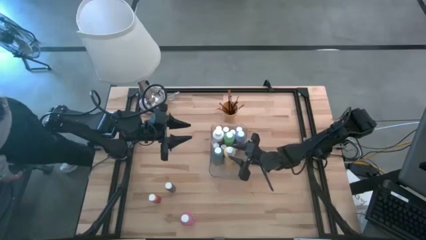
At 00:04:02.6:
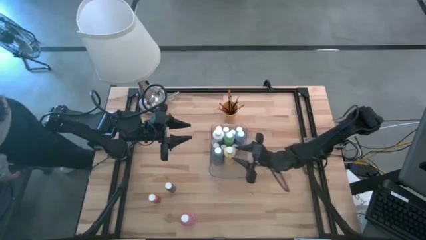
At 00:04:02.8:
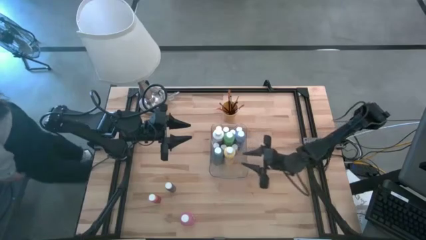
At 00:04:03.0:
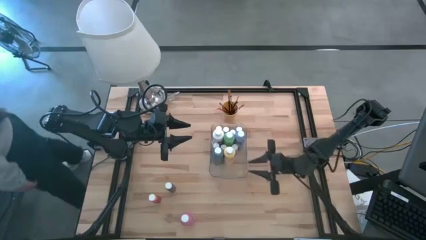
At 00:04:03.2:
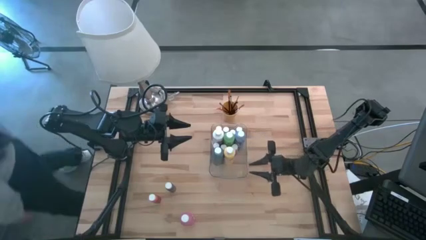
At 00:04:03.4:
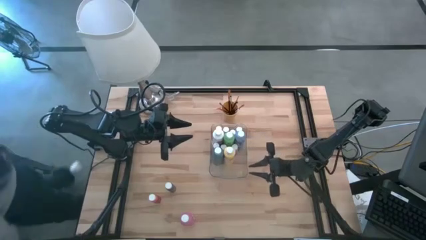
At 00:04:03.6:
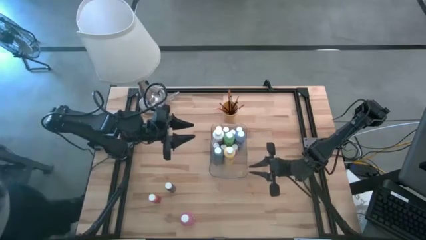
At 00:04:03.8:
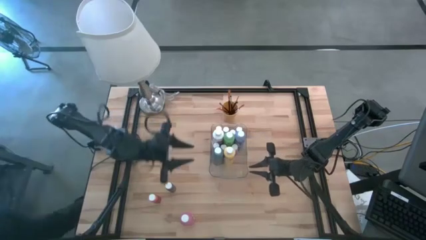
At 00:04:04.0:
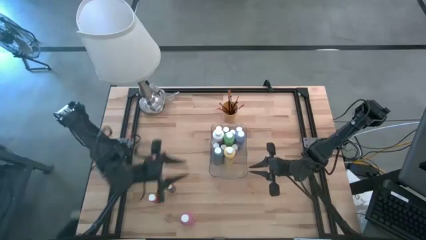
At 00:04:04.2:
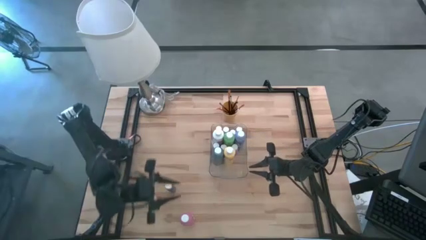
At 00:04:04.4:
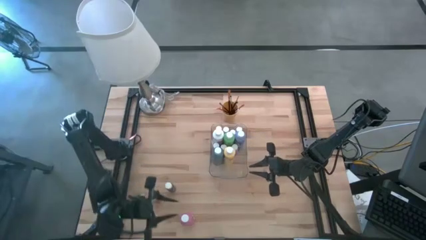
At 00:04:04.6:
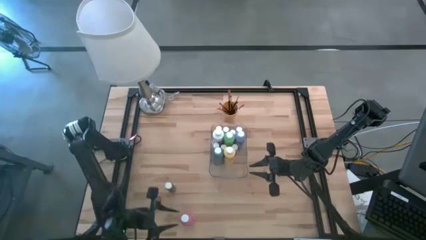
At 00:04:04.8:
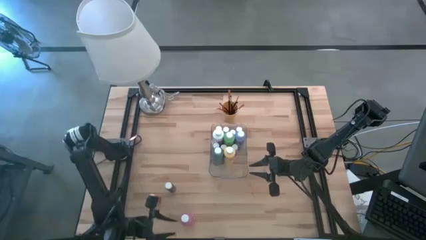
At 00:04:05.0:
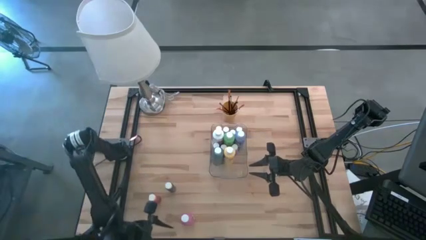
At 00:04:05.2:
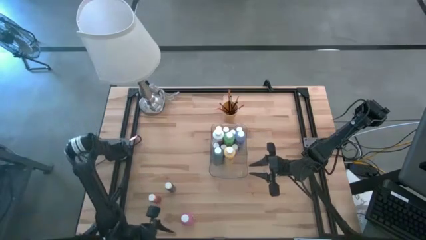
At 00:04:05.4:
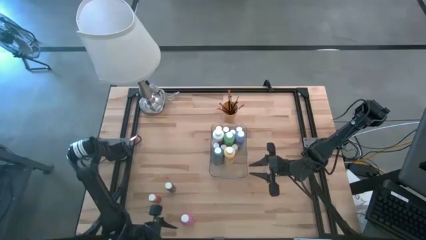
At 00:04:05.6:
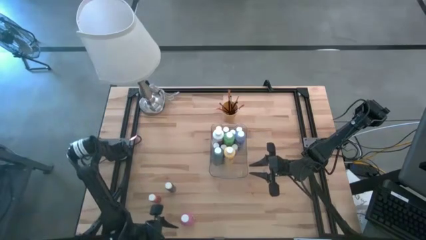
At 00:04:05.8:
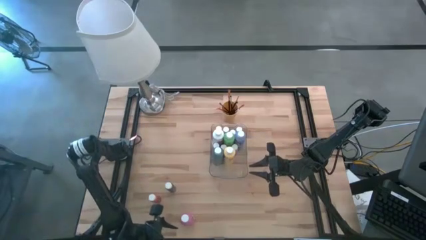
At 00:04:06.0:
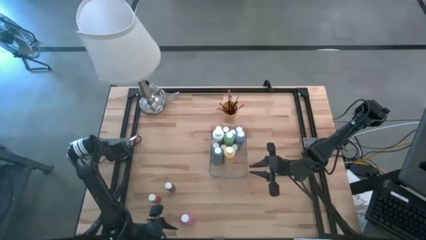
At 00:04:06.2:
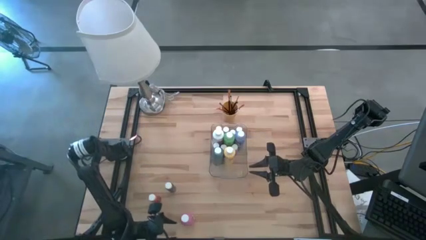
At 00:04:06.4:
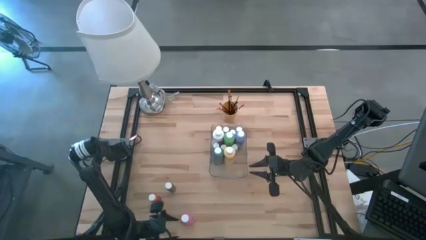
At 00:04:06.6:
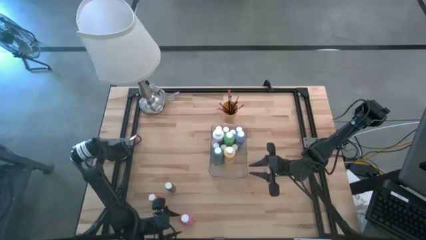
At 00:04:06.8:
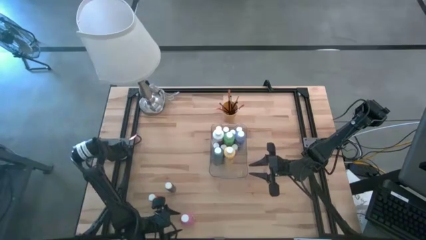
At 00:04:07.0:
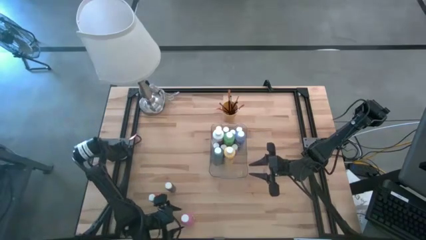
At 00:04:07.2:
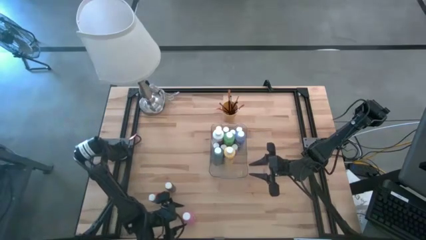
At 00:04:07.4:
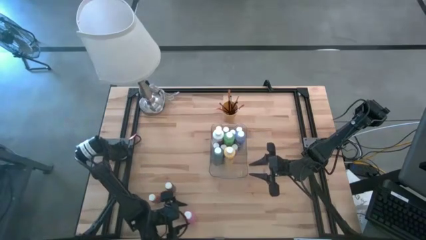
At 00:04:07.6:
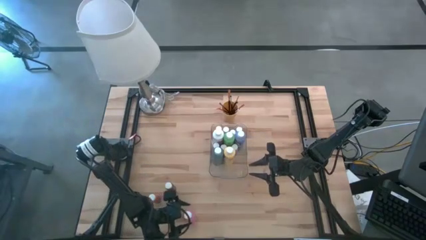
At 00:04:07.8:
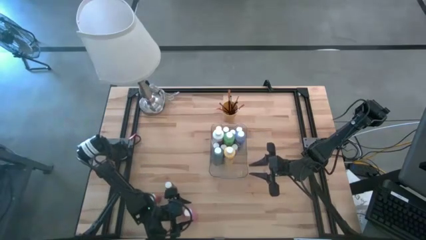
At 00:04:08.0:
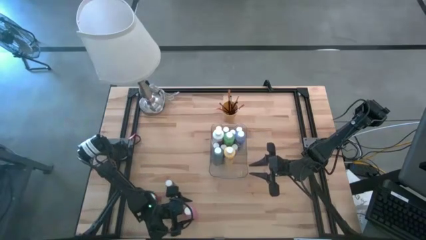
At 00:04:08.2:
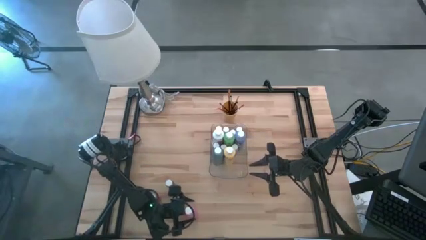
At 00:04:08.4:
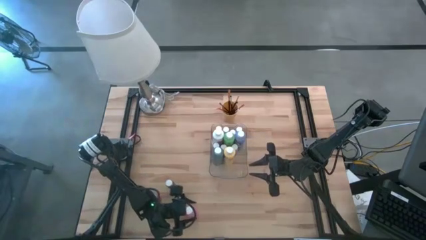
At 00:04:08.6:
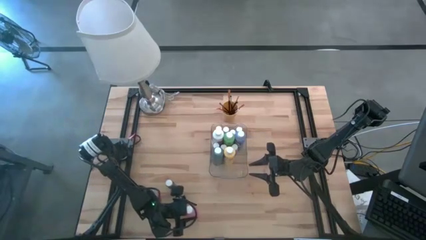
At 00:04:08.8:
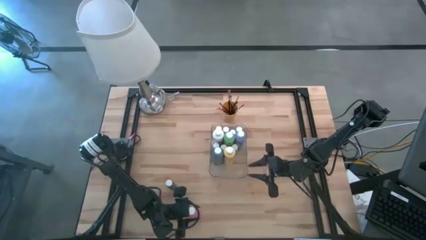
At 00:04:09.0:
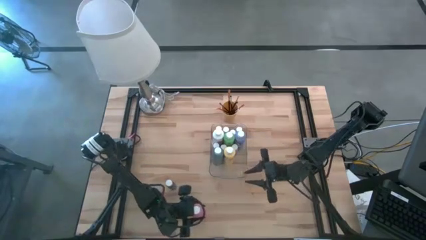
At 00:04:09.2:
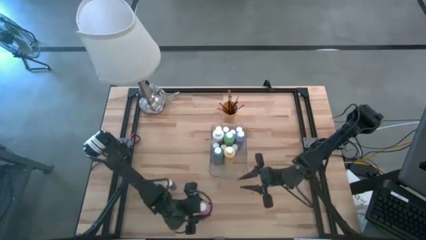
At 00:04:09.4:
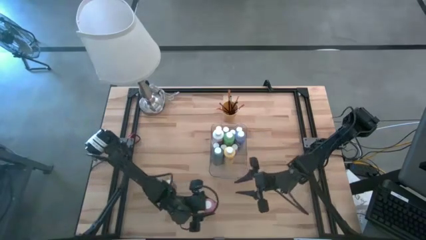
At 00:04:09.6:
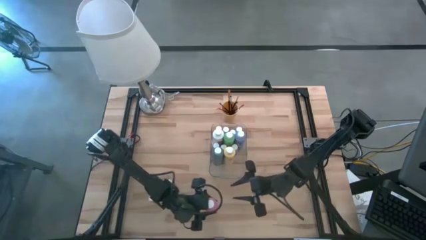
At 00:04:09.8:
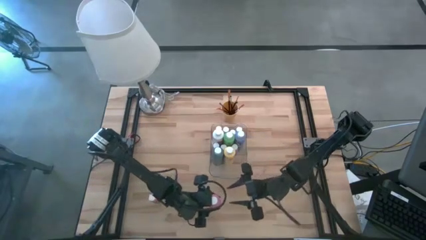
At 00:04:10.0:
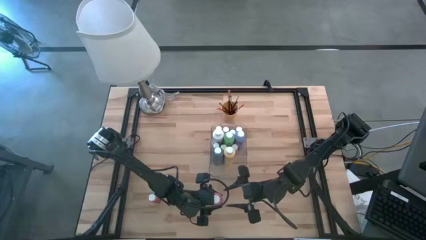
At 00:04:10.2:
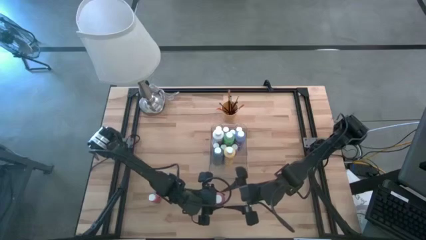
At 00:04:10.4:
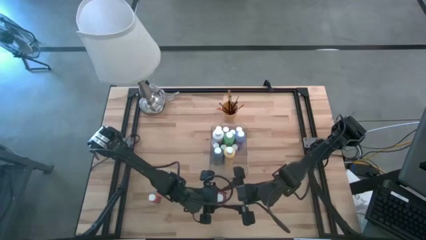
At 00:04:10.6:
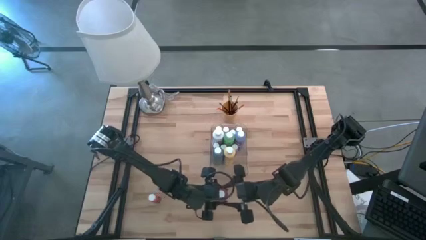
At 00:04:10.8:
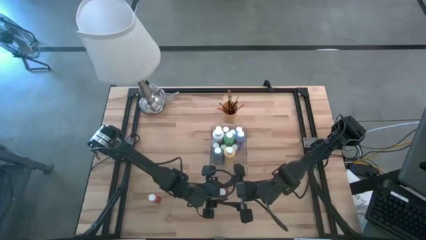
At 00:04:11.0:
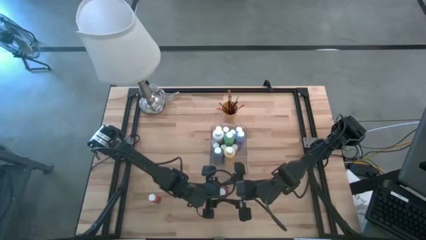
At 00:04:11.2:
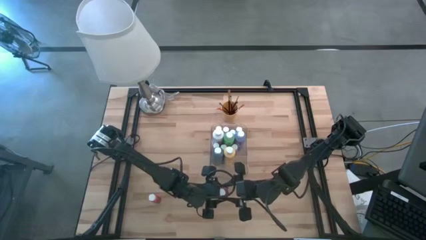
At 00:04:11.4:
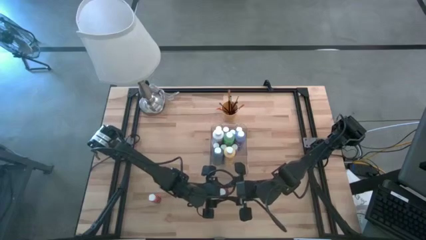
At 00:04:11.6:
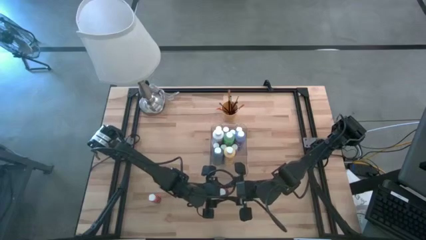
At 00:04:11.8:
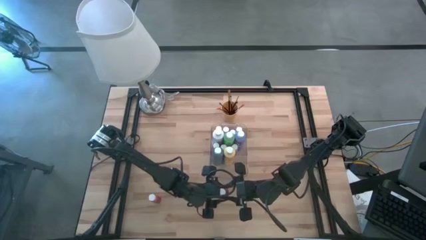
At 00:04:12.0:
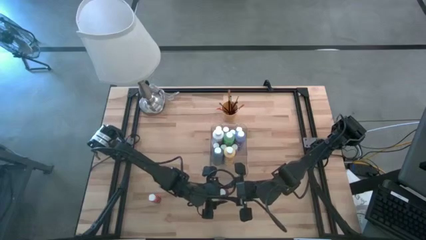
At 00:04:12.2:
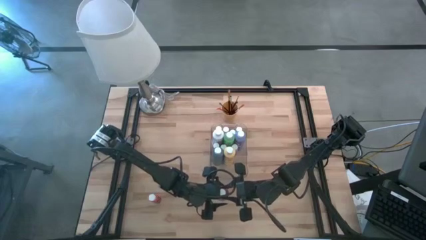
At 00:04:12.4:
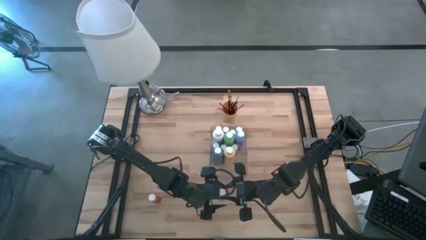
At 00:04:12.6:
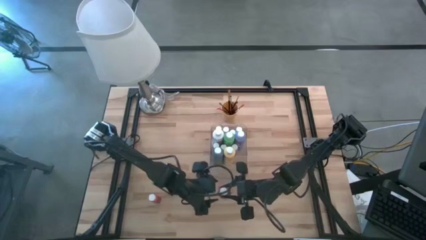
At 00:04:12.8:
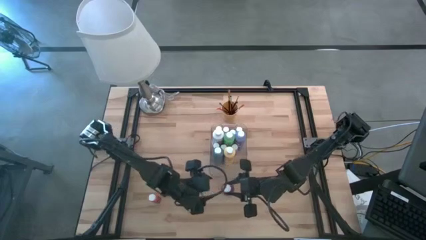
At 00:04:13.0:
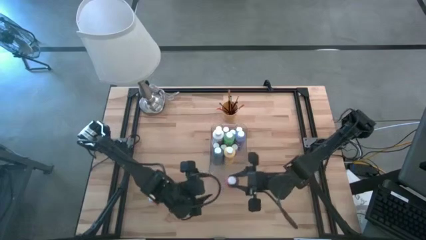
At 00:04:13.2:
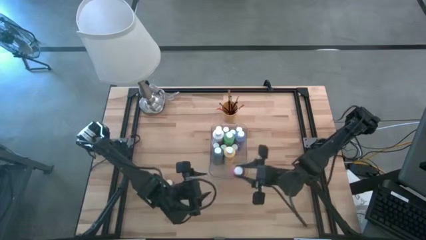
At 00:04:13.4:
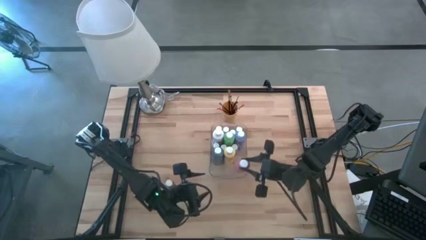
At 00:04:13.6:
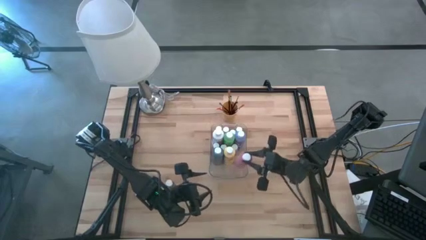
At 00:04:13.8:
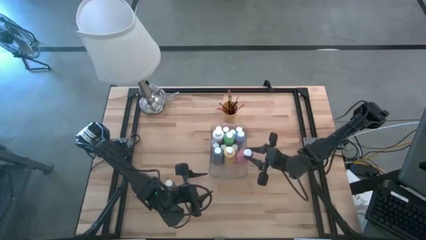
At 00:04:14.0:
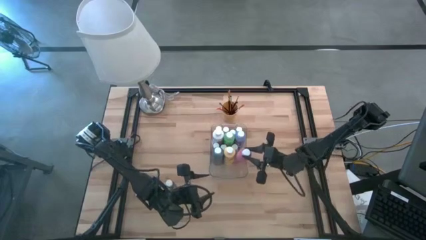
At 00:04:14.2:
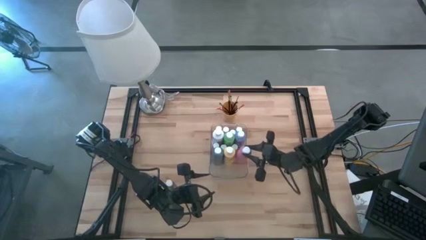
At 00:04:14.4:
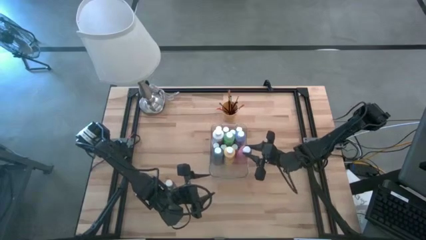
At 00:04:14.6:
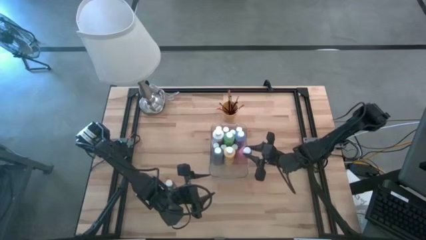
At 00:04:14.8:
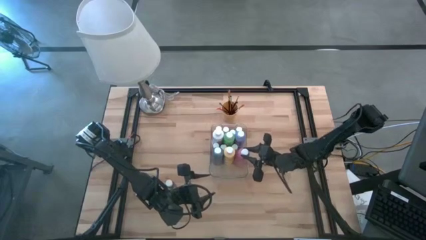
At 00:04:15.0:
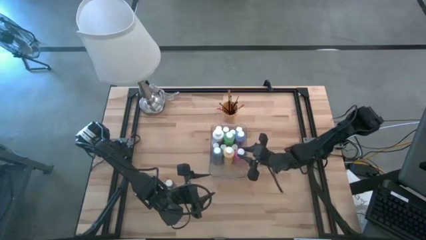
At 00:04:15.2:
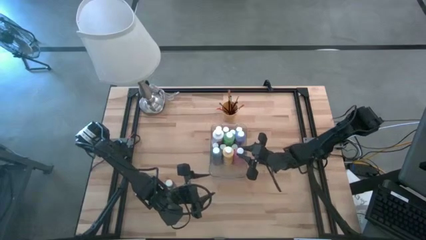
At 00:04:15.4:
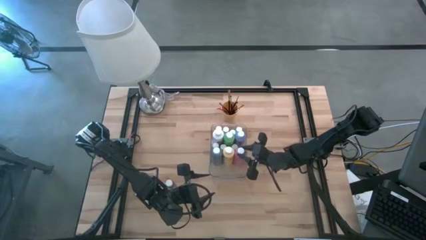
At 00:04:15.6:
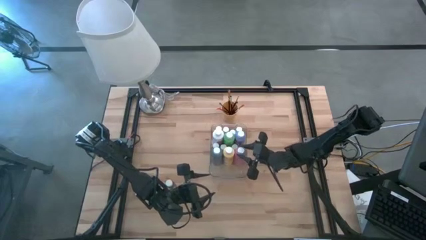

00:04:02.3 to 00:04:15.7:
Task: Pick & Place Paint Supplies
Put the large pink paint bottle into the transparent bin

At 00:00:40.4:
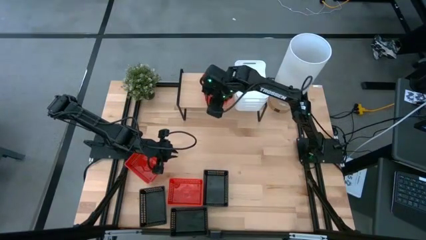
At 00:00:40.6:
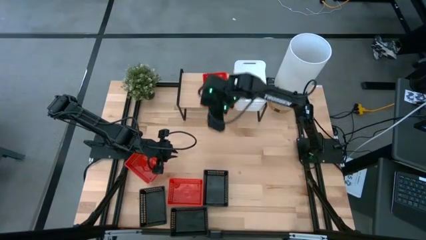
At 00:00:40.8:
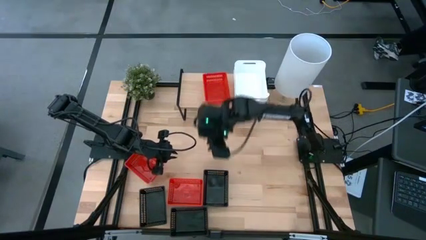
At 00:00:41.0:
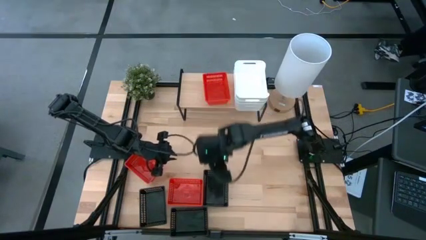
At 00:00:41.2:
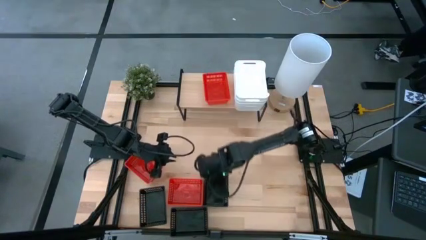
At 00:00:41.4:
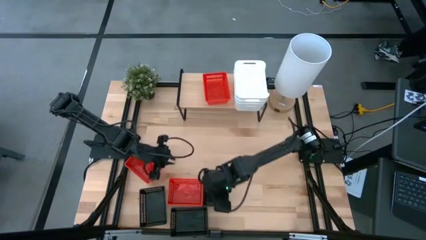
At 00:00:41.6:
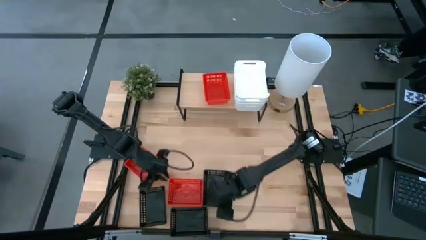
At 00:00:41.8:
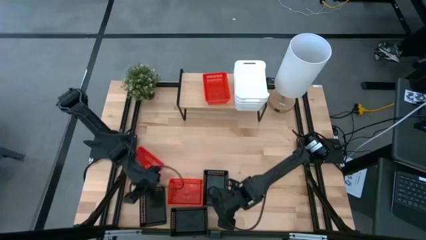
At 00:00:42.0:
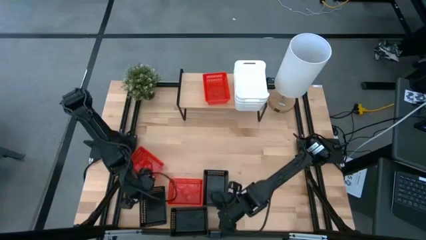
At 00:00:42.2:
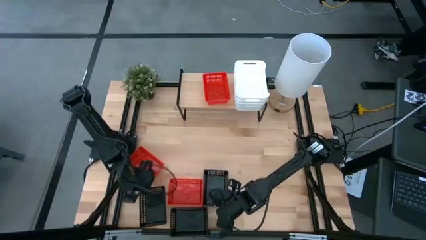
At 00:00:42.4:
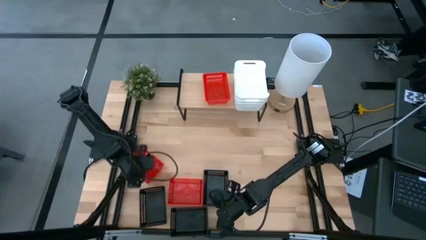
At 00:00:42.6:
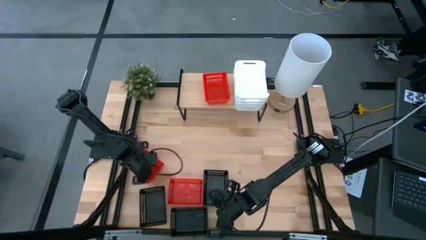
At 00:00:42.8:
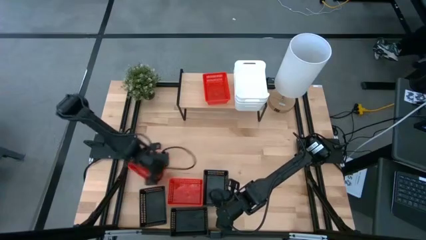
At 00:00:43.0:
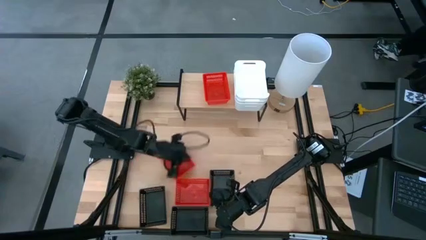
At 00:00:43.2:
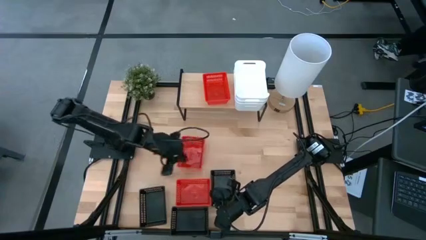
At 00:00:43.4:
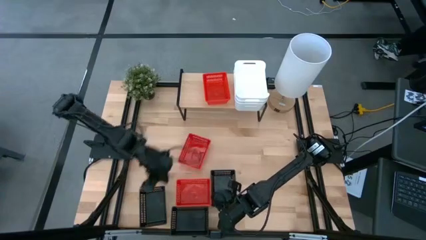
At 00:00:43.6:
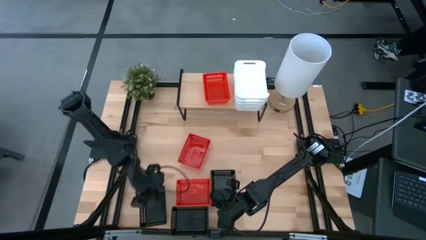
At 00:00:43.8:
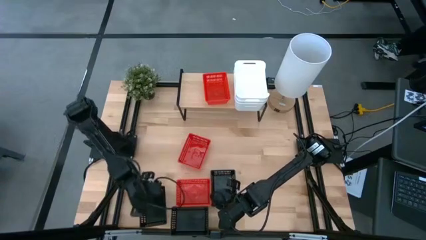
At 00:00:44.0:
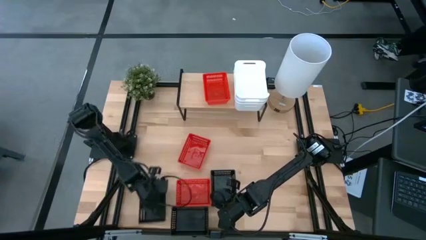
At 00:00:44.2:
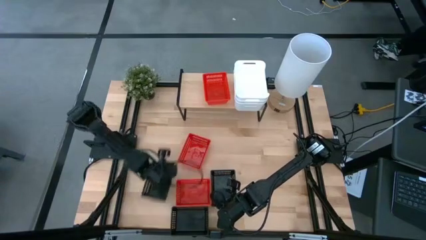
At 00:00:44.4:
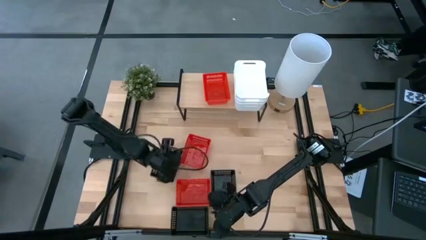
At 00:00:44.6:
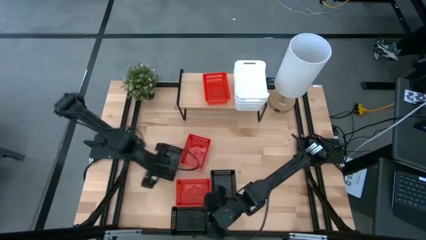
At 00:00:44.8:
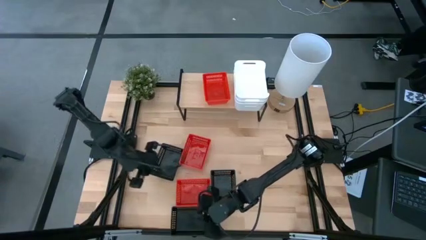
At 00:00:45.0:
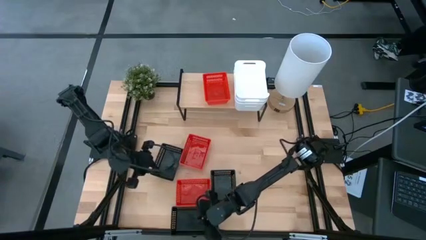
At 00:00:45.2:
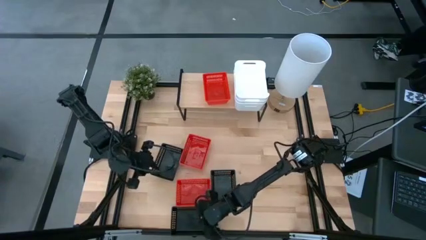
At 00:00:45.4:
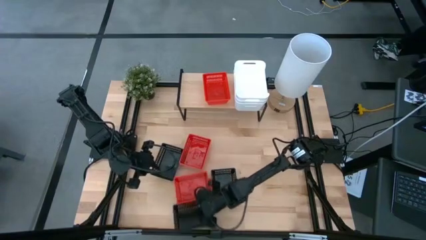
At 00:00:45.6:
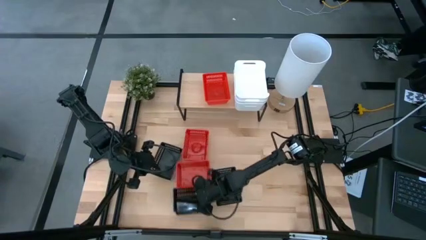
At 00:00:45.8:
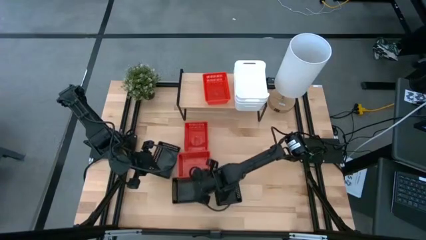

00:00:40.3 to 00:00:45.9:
Task: Stack baskets on shelf by color
Move the bins to the center of the table
